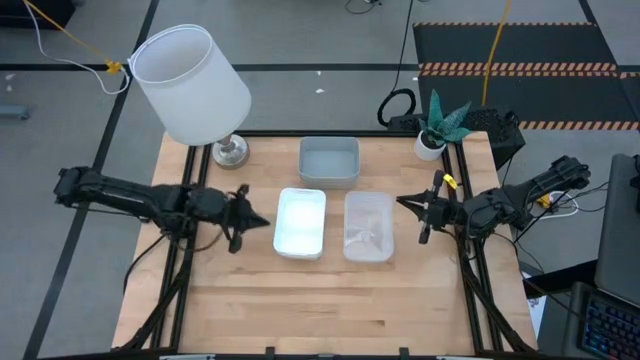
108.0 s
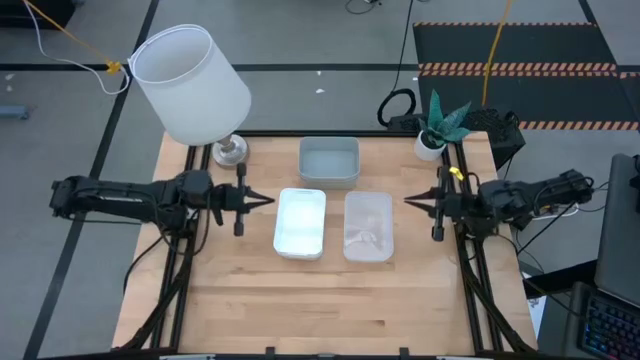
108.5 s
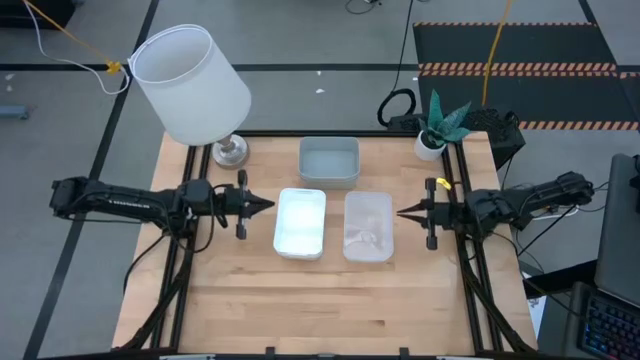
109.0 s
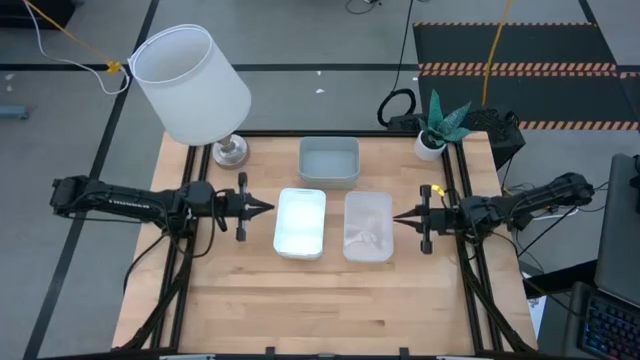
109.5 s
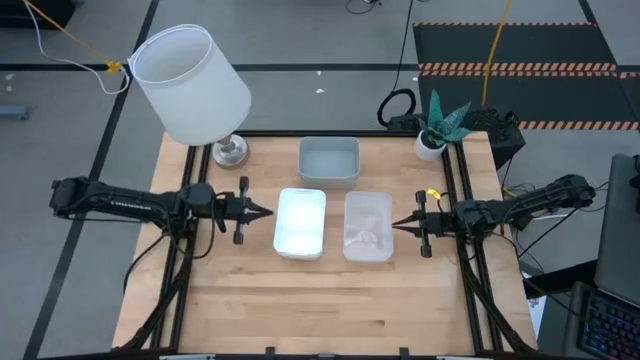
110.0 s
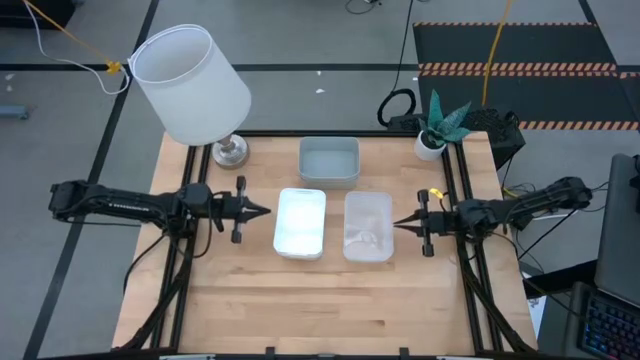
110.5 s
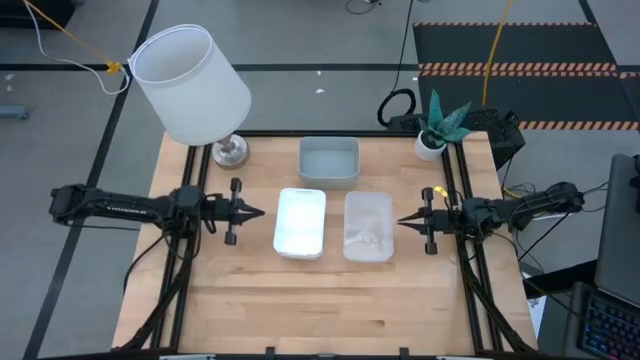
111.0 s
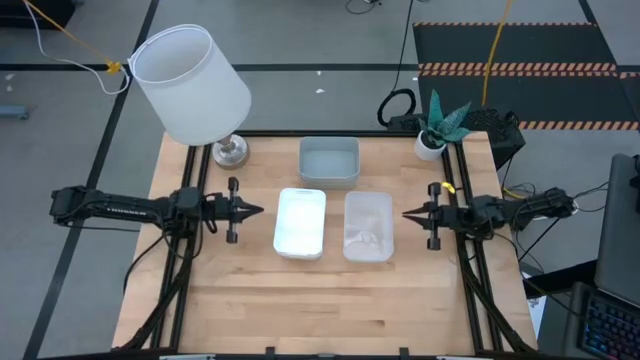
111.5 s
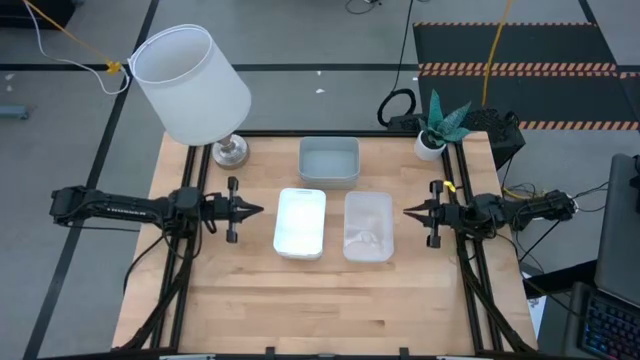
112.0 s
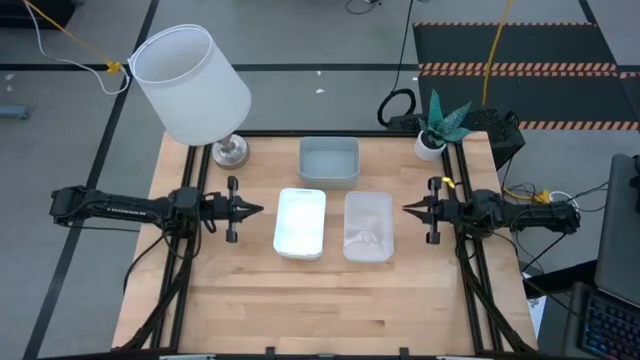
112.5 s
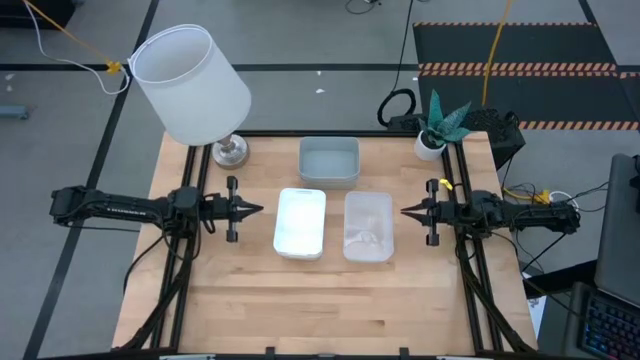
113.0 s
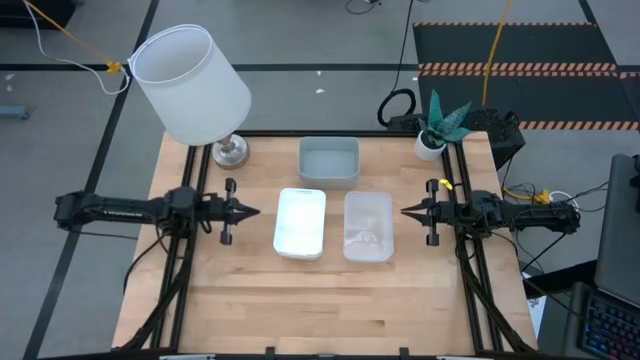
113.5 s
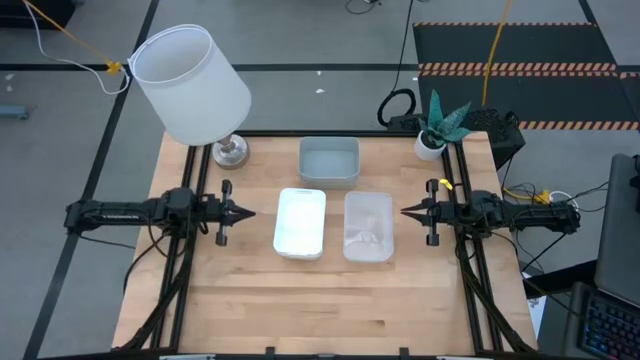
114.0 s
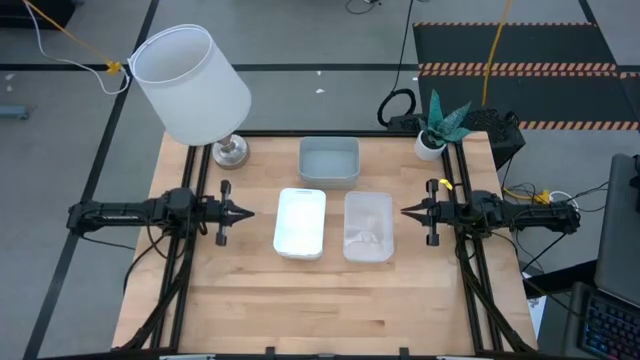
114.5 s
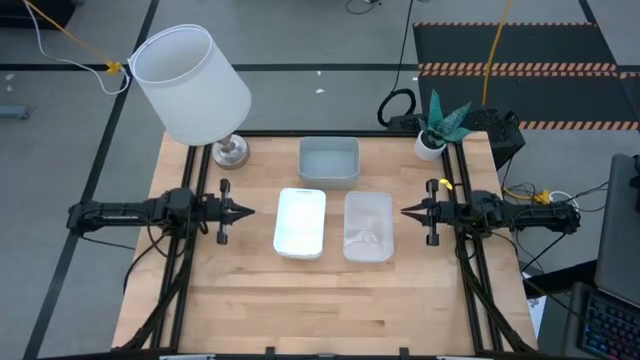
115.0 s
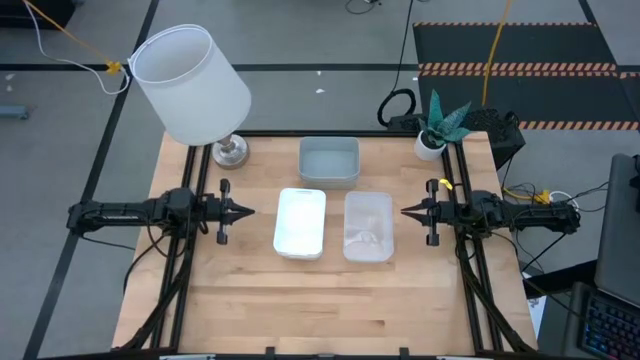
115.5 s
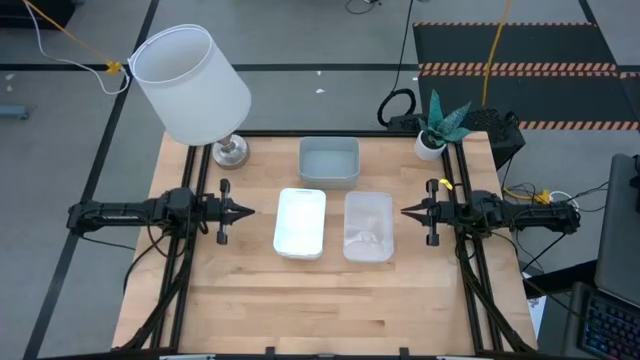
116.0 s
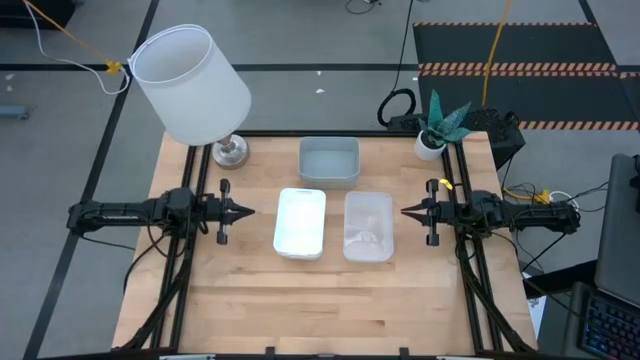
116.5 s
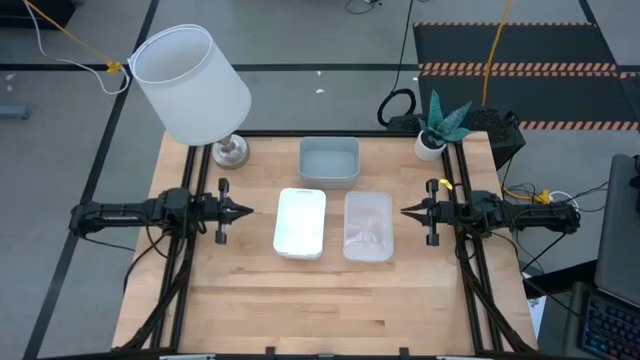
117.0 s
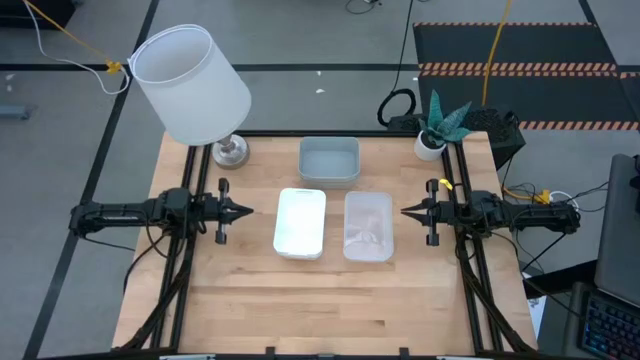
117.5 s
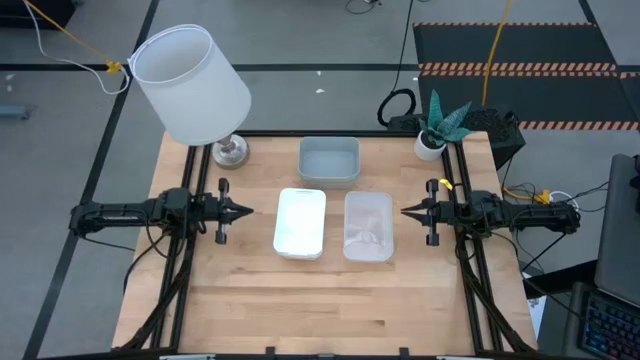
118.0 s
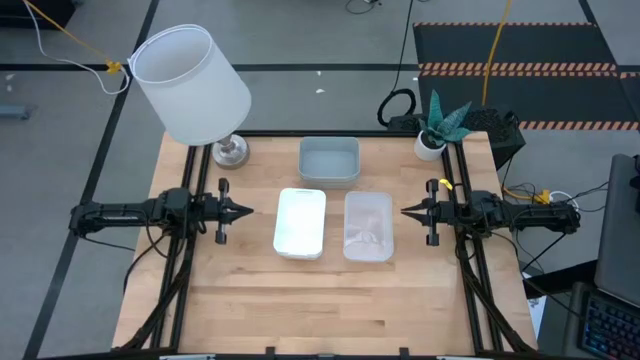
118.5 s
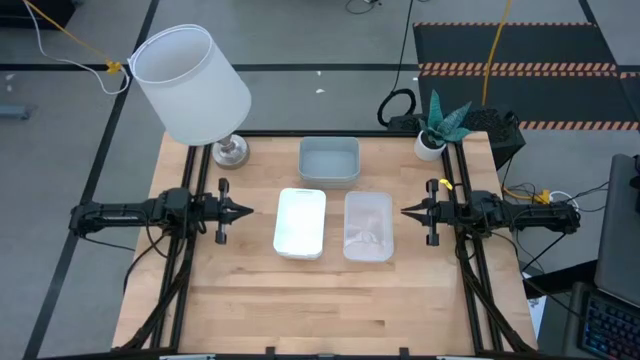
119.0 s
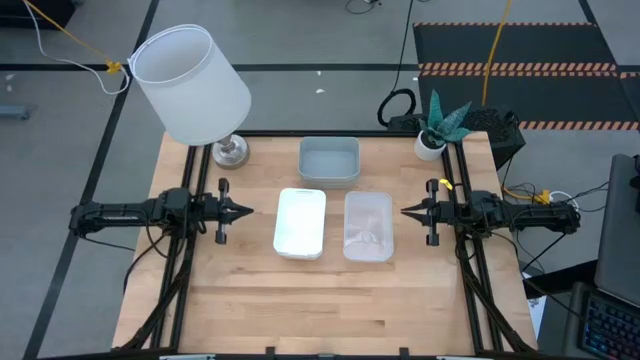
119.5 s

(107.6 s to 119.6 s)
Return to Home Position
